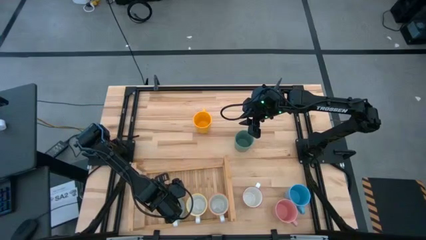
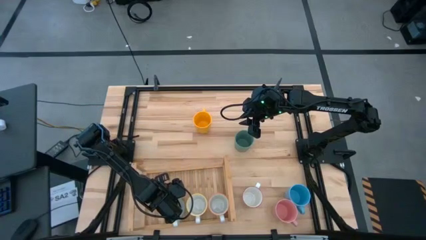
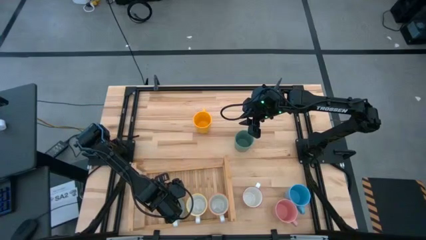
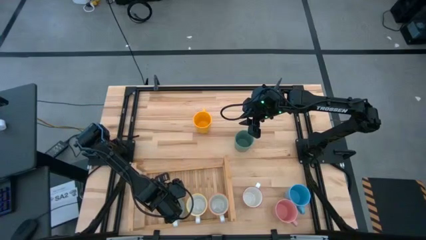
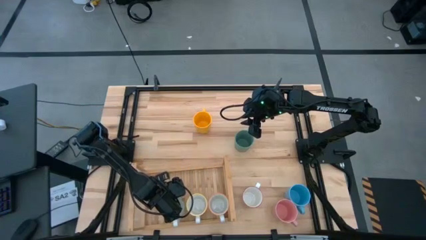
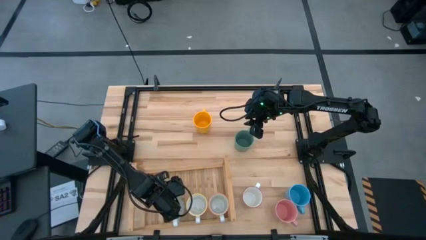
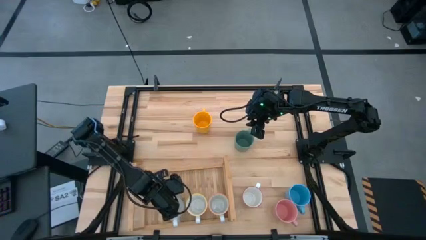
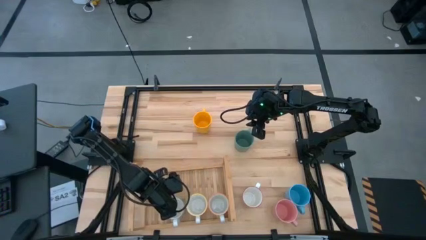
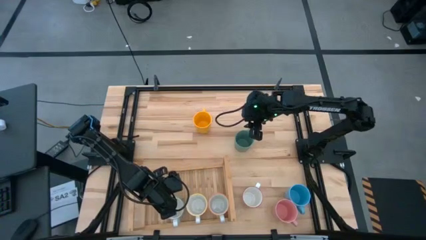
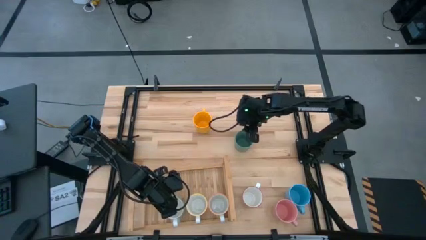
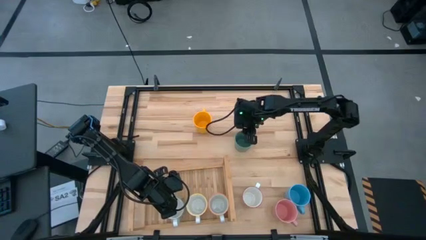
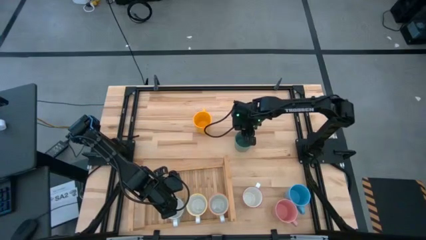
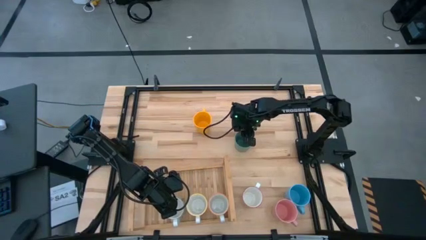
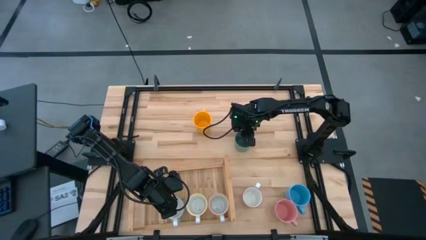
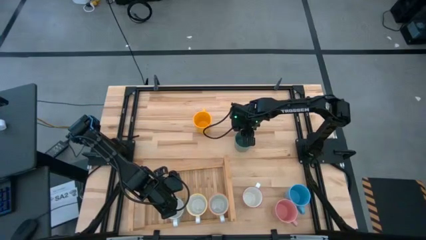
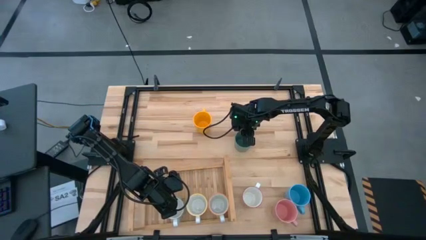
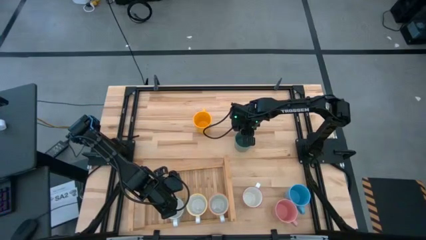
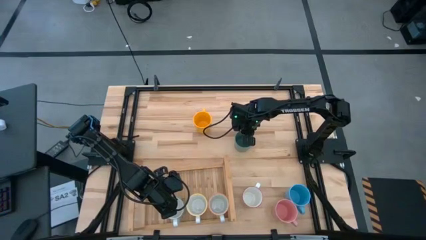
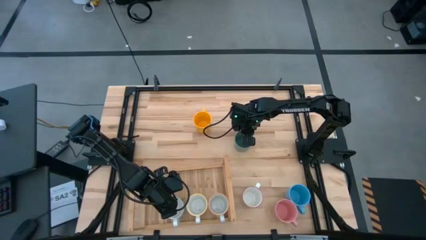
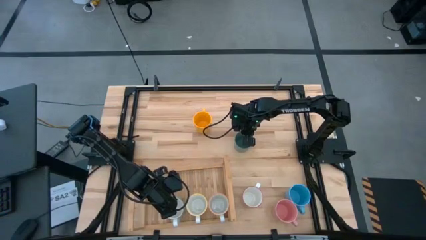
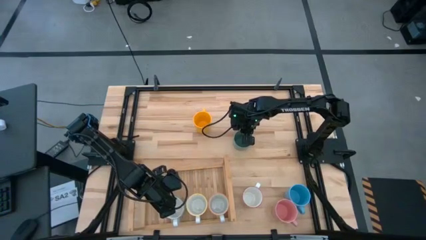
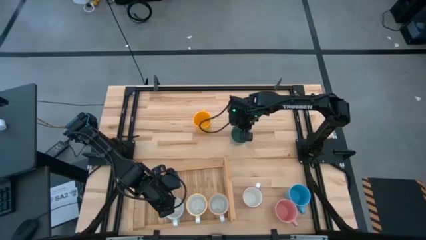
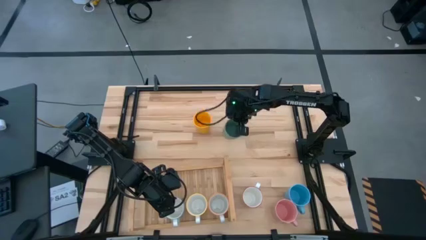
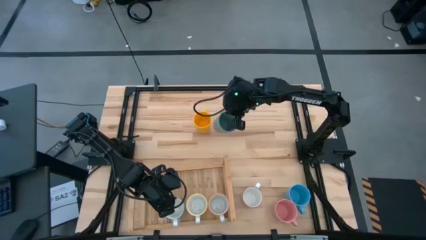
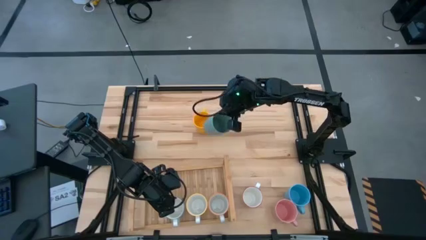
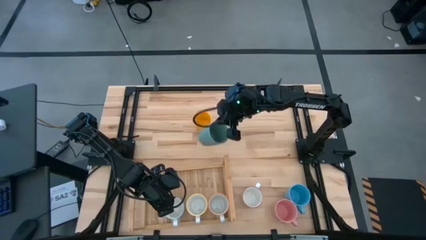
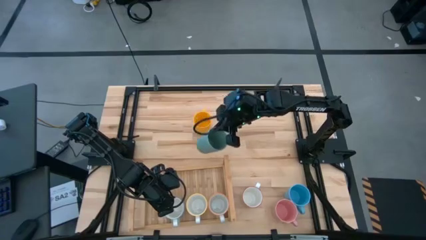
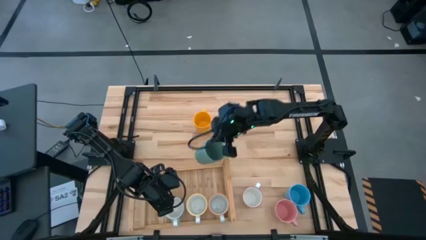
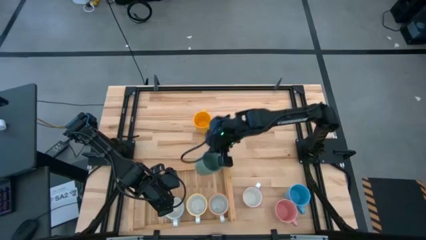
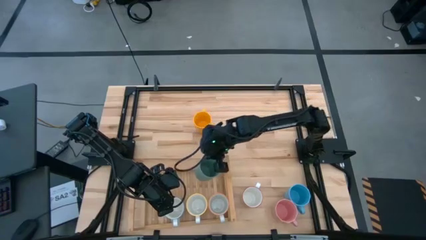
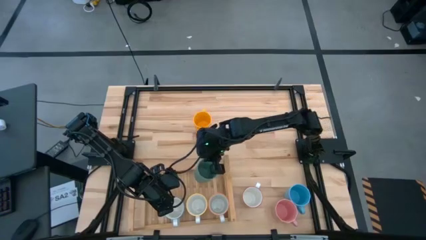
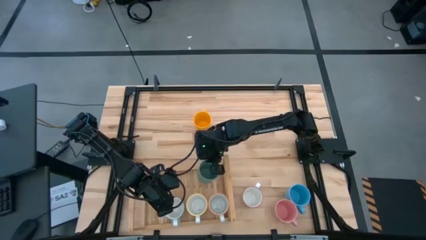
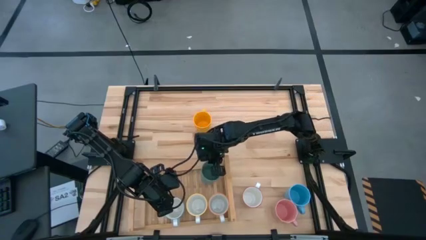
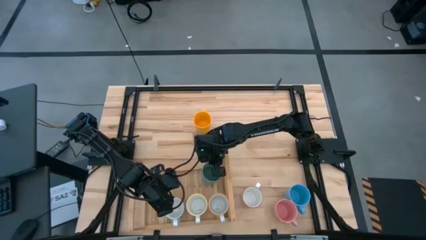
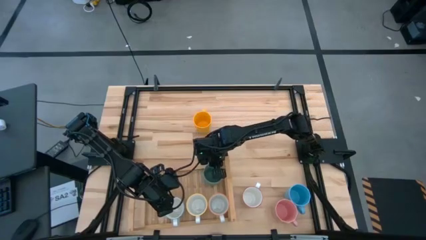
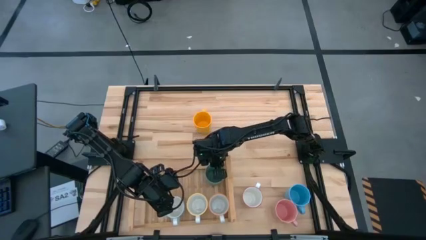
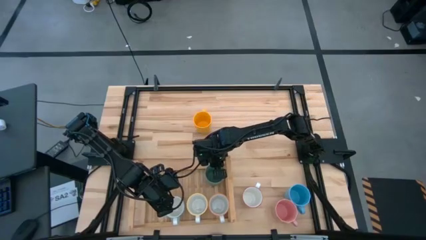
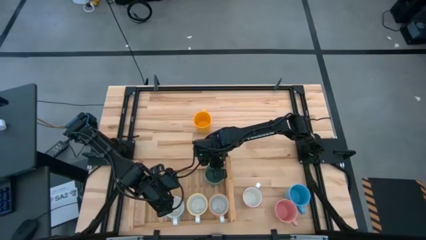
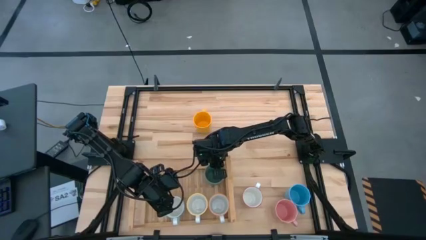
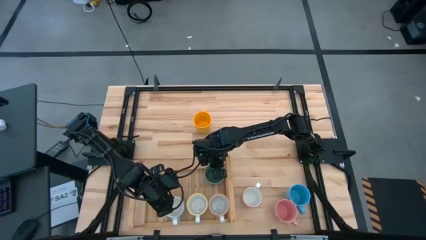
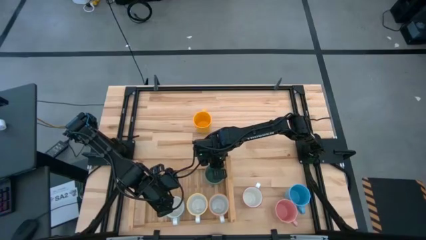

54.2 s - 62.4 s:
Task: Place coffee mugs
Put the green mug on the shelf

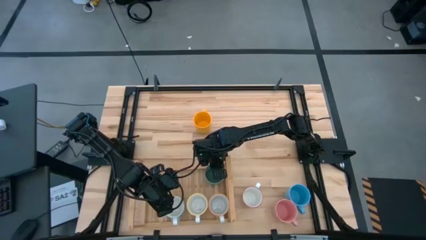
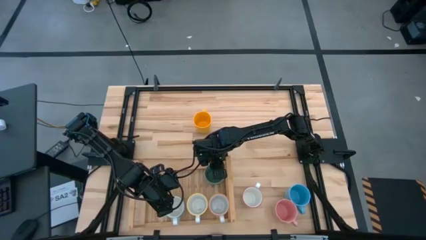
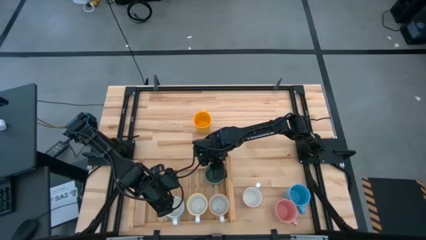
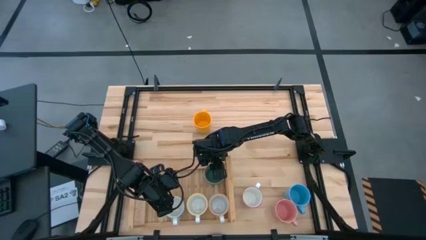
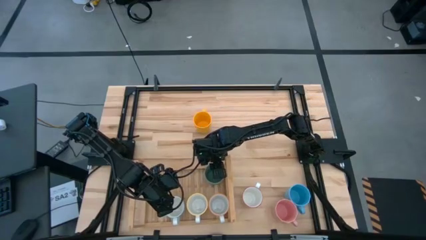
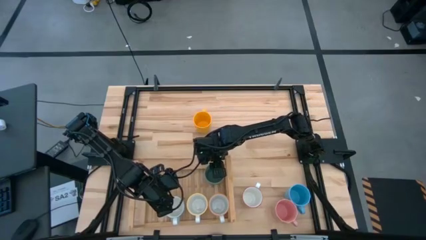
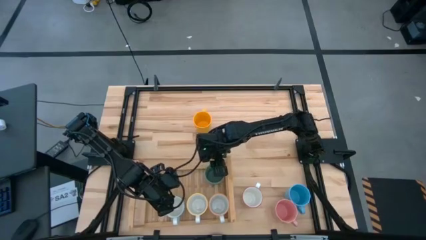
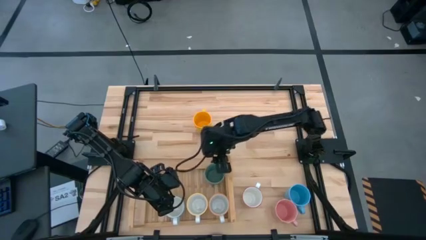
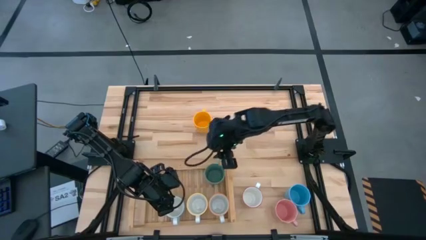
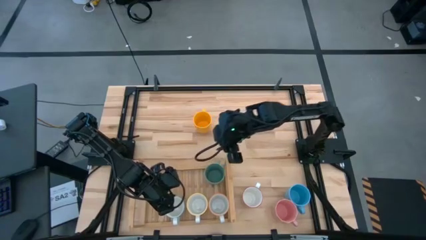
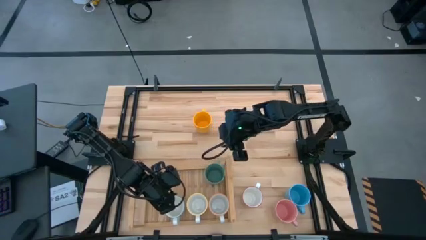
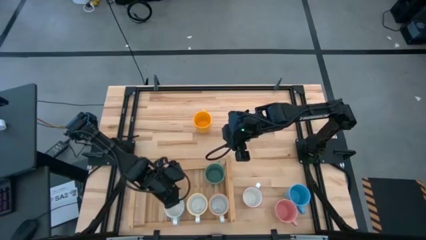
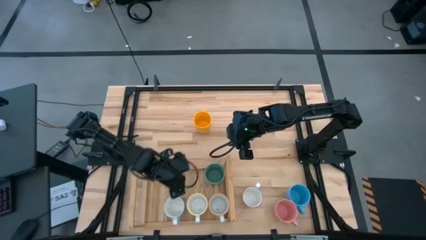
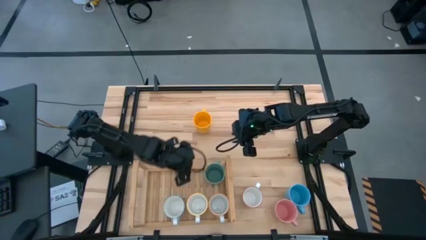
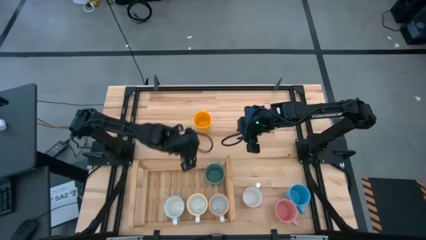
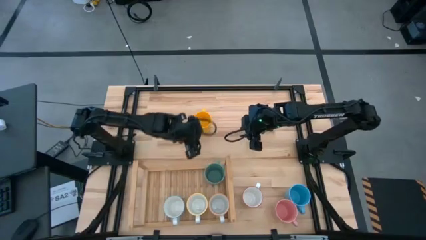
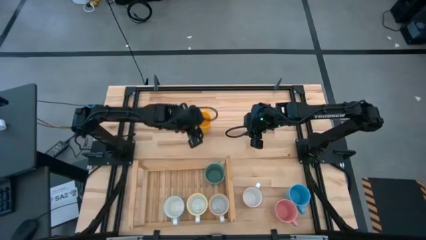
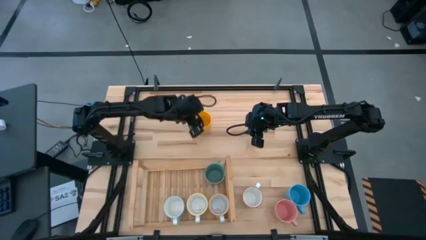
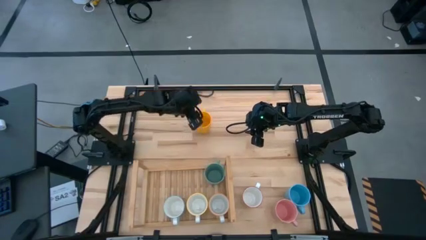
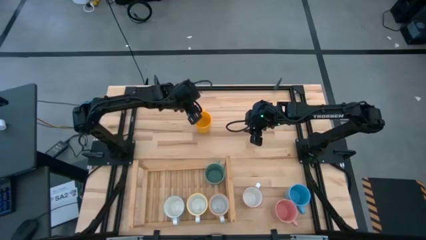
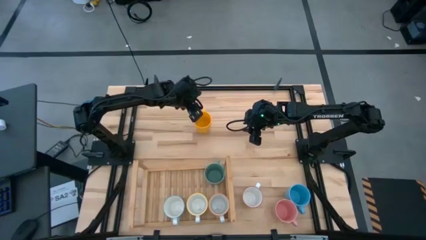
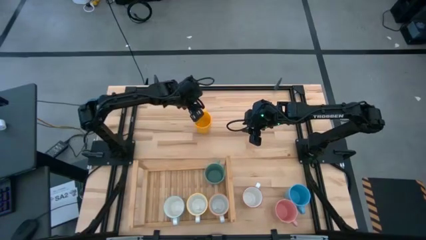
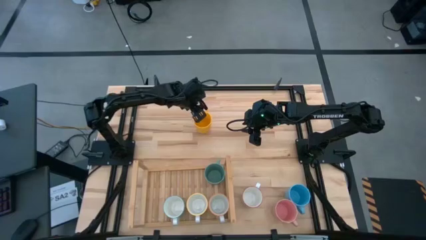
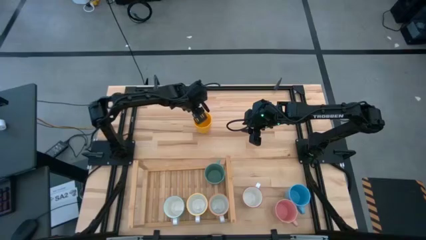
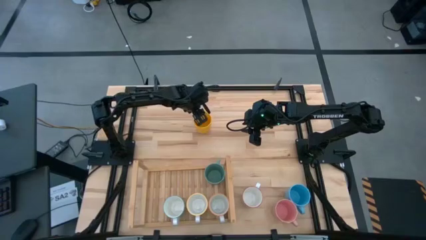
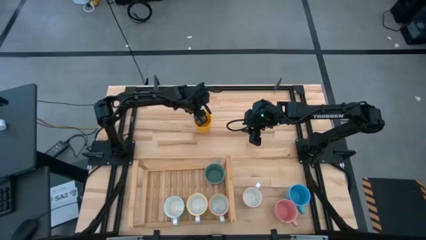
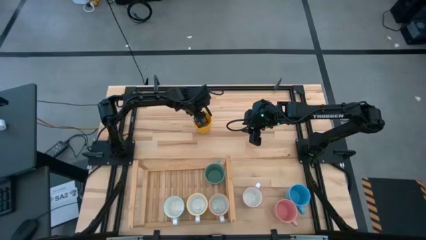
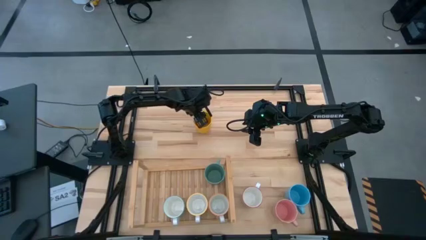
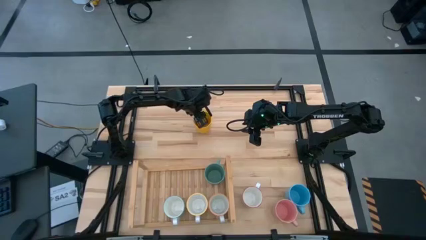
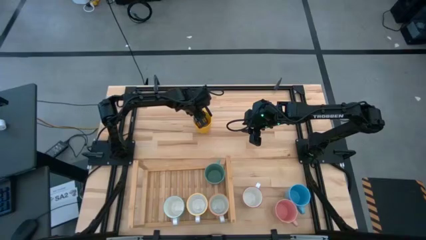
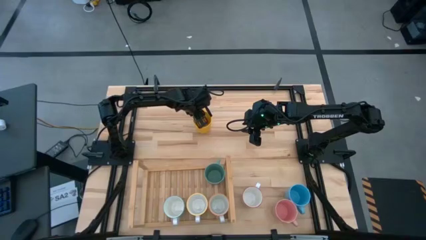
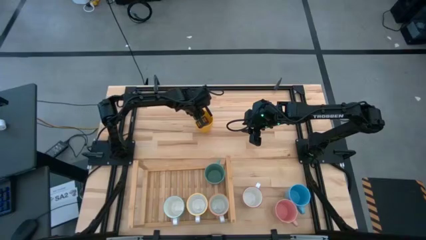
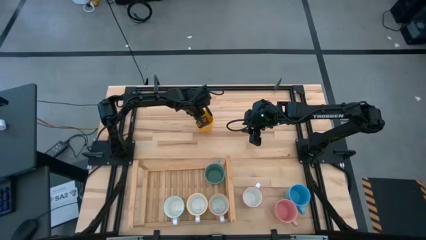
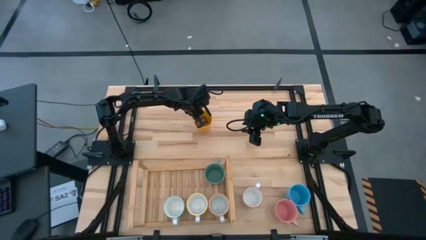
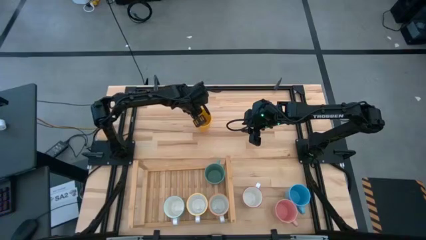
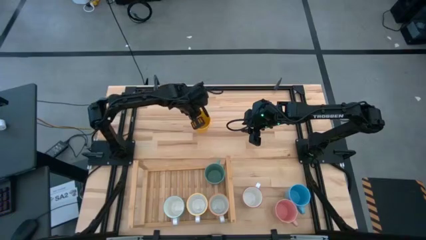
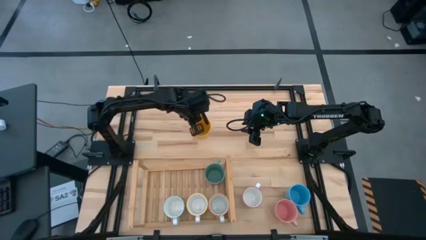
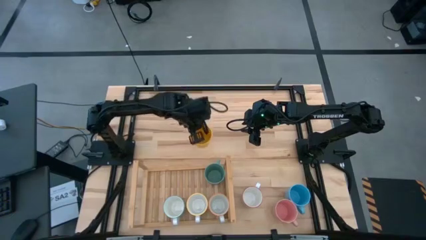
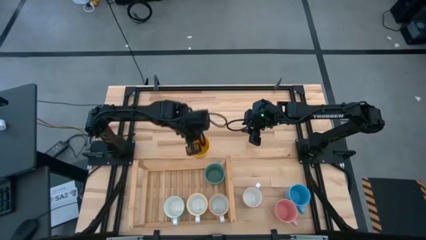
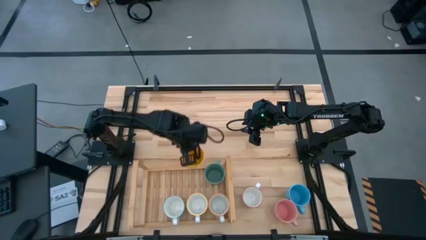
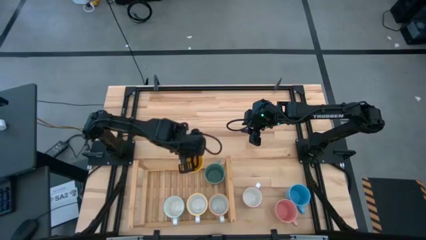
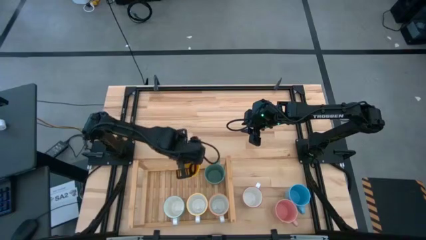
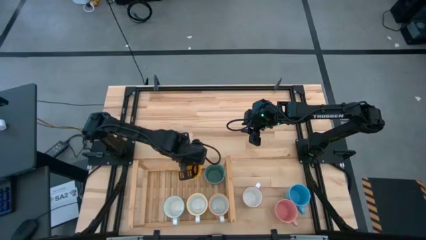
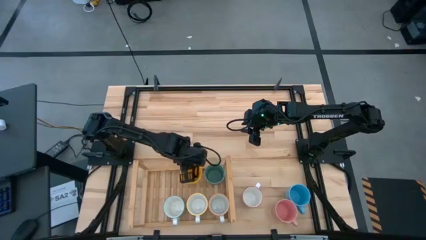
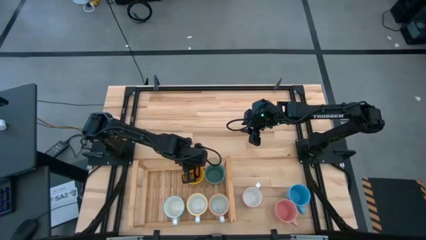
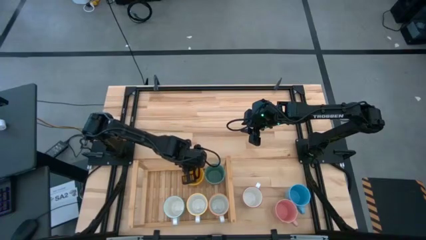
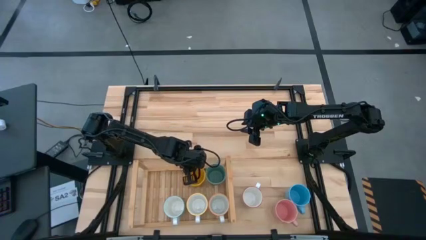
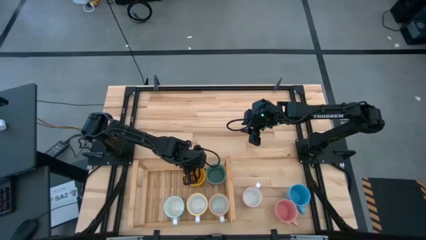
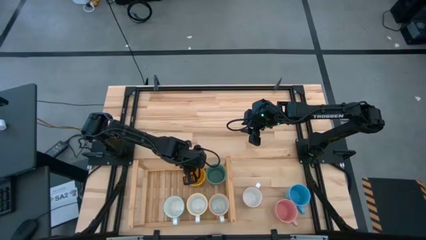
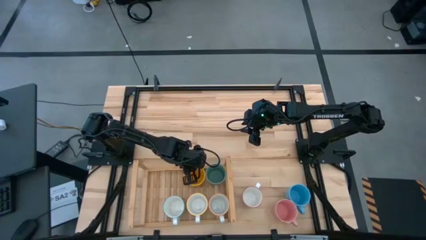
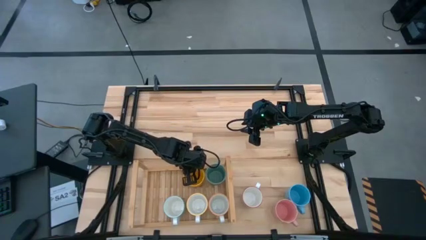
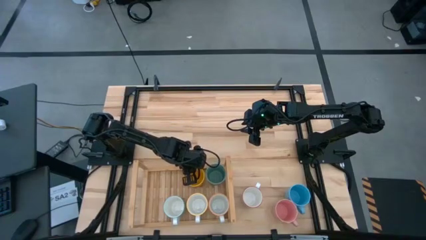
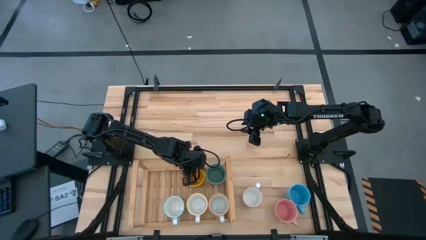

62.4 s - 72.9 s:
Put the yellow mug on the shelf
